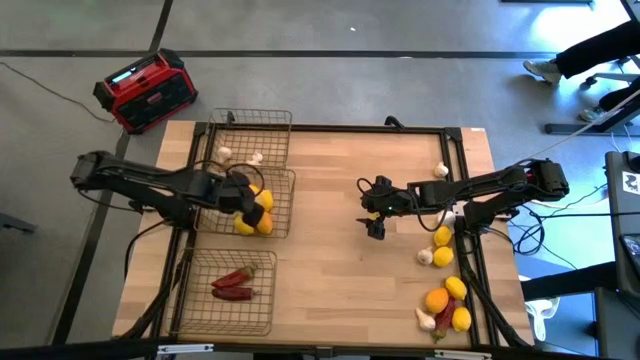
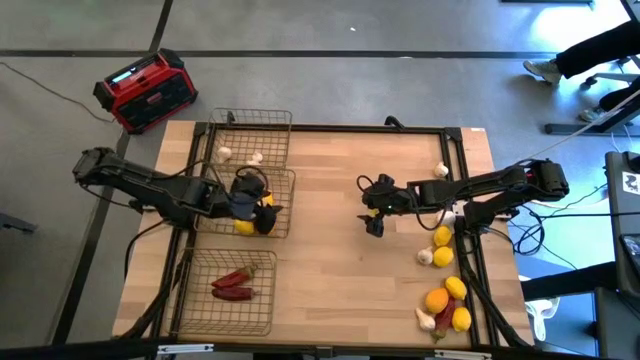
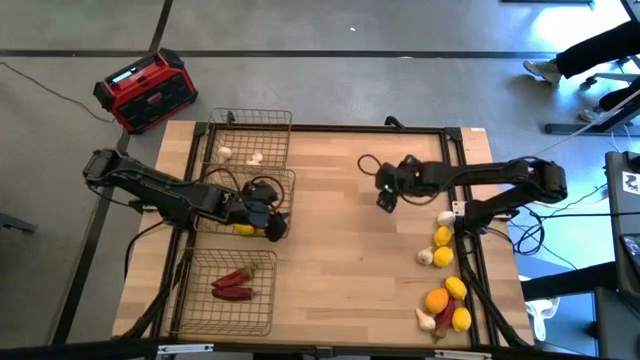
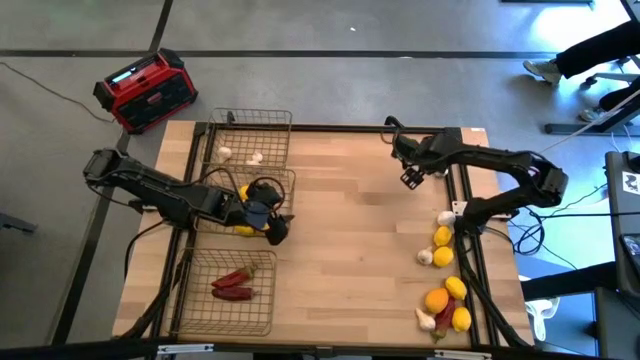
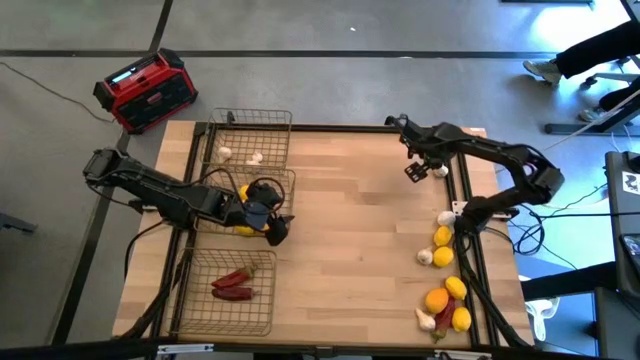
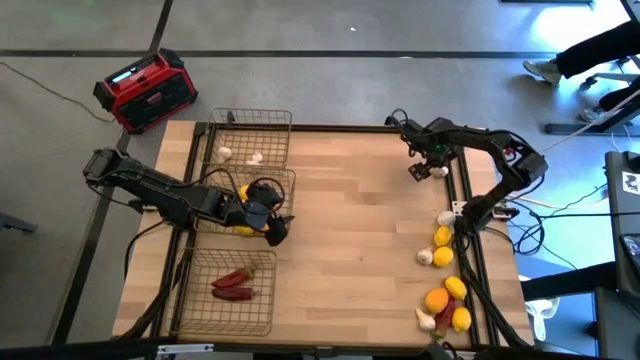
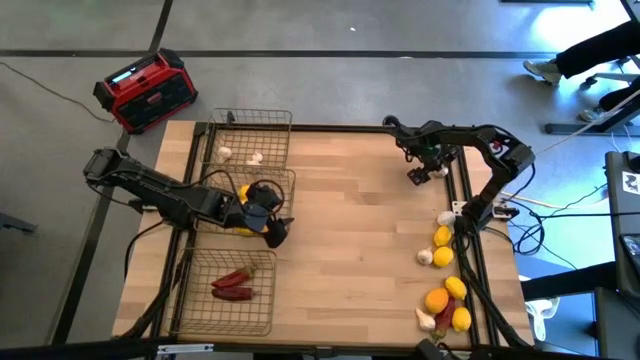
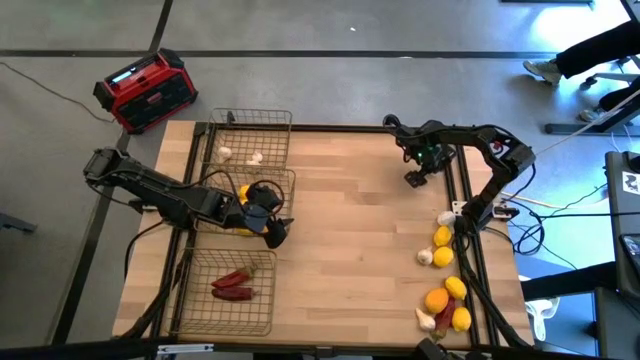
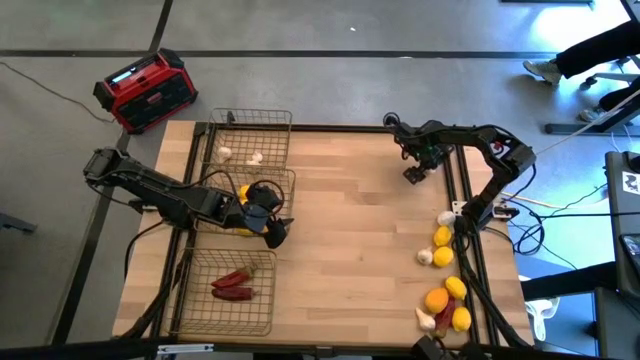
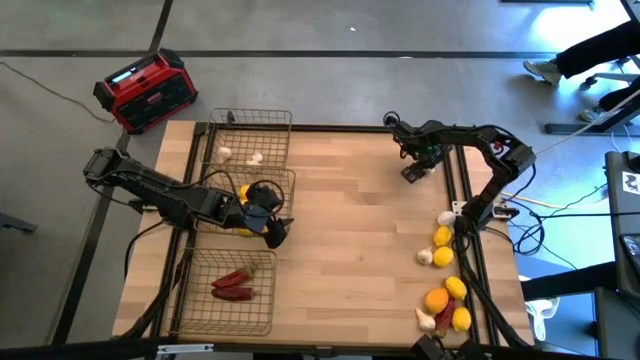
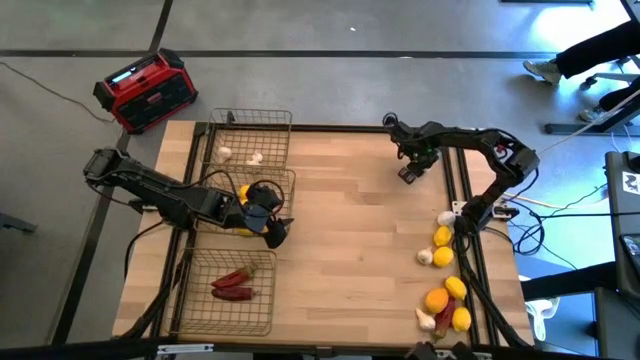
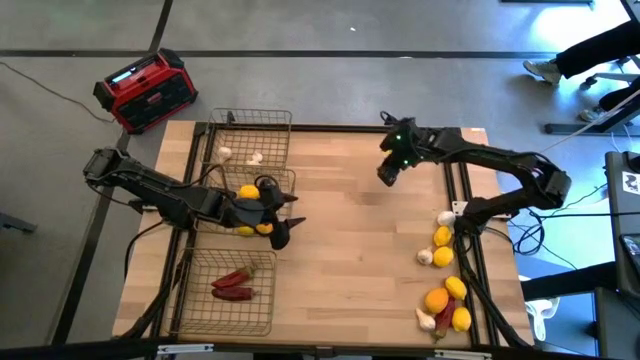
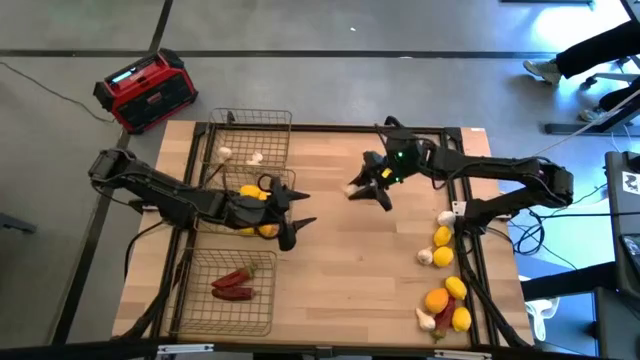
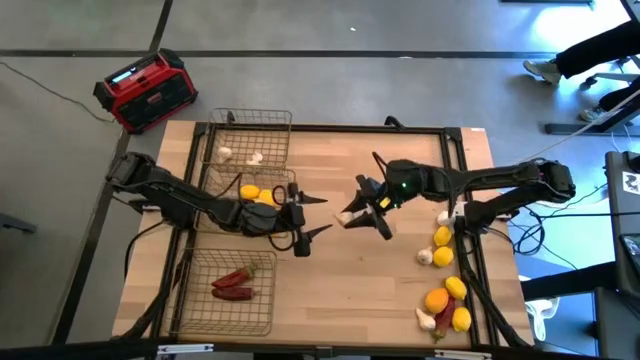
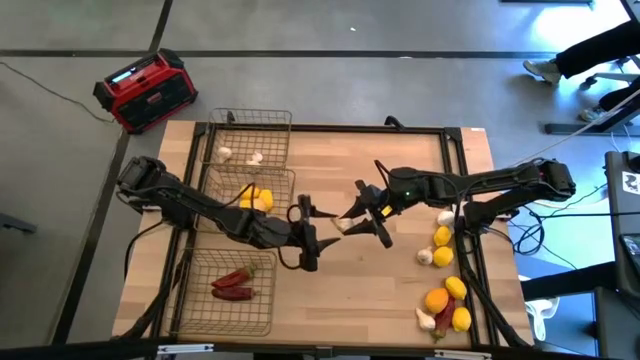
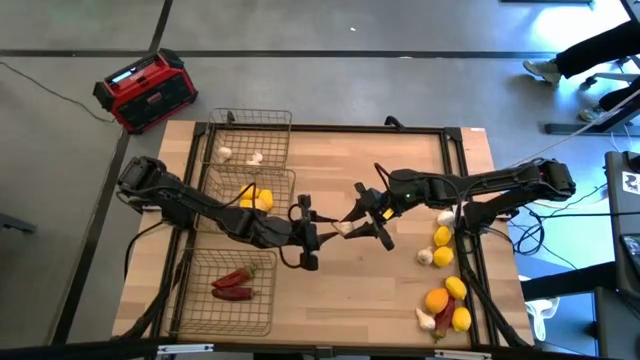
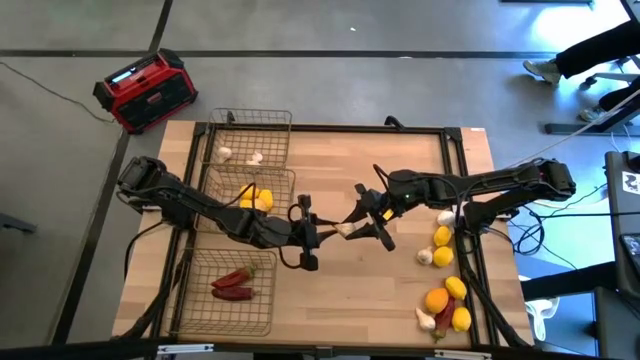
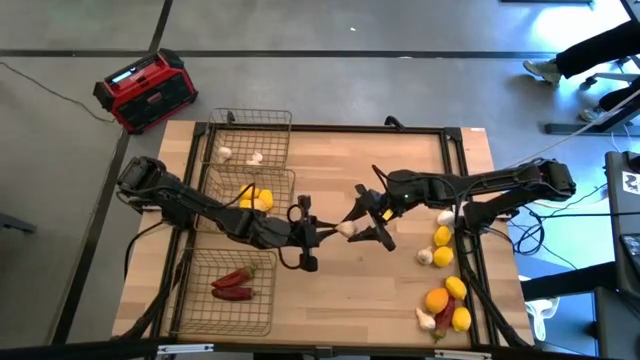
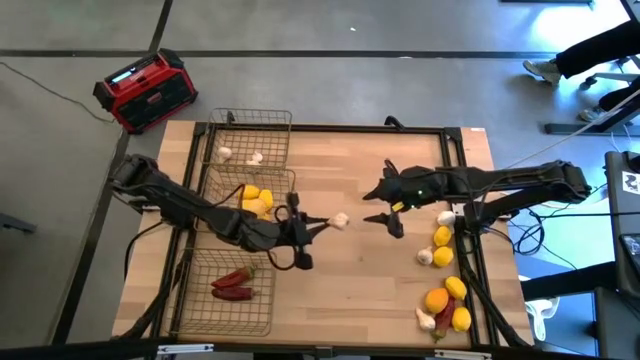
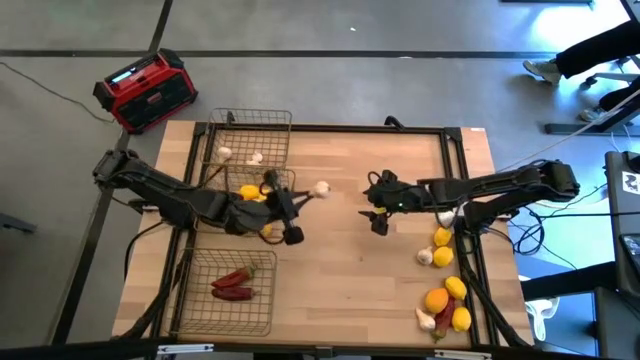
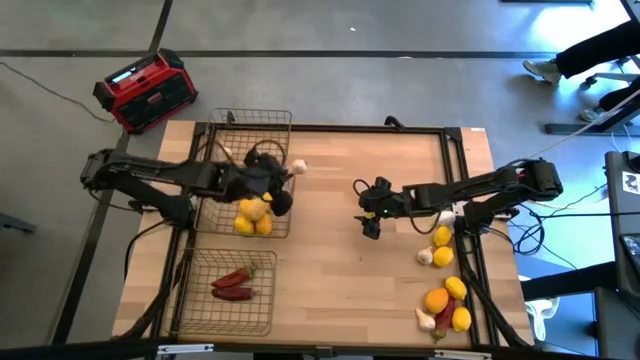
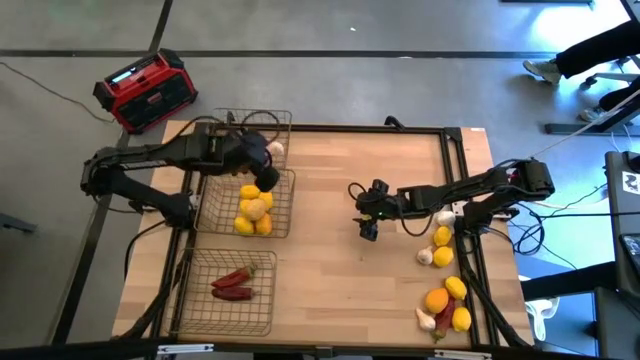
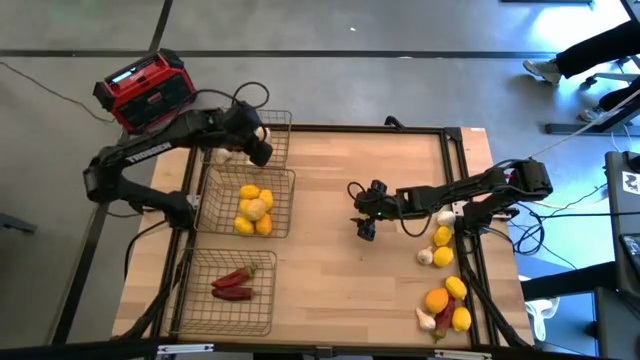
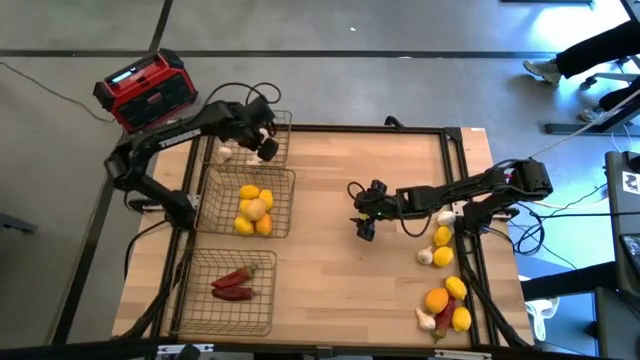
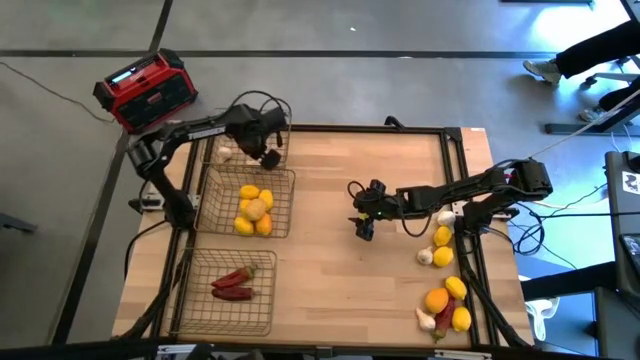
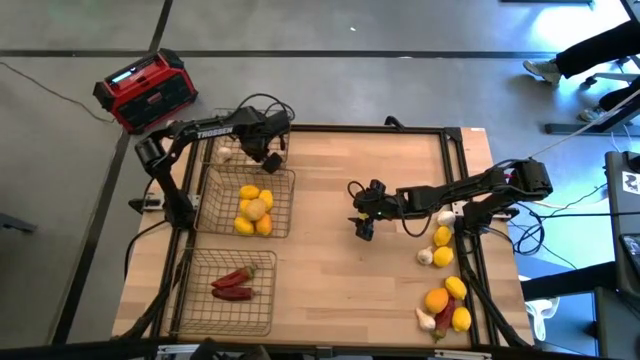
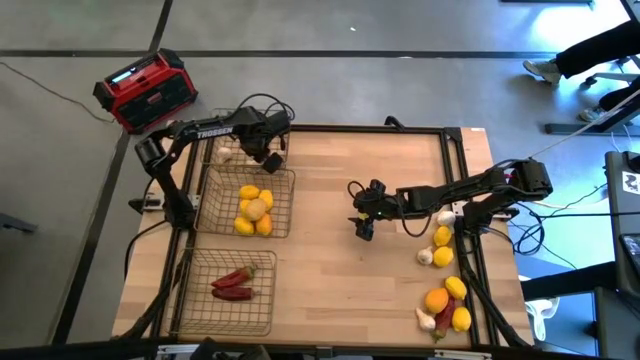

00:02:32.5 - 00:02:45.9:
Task: Sort produce into baskets
Put the garlic in the top wire basket

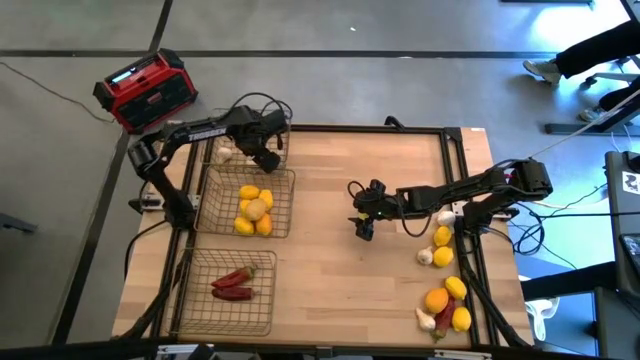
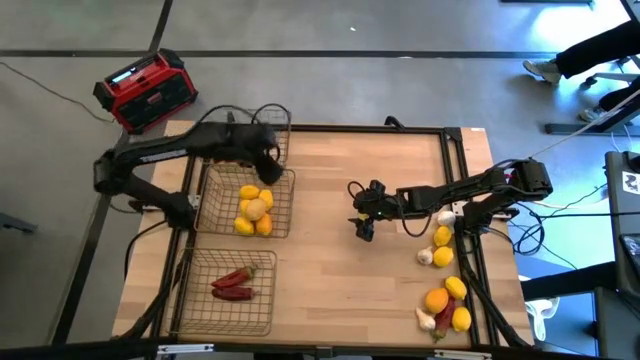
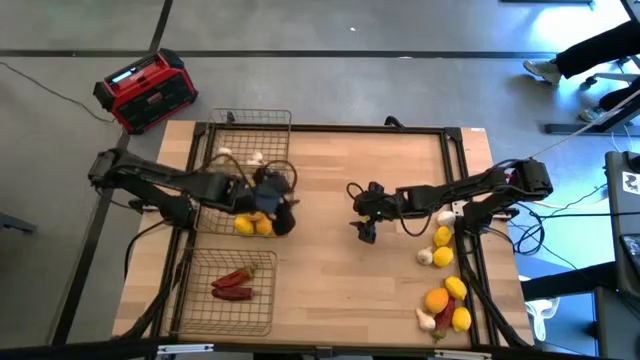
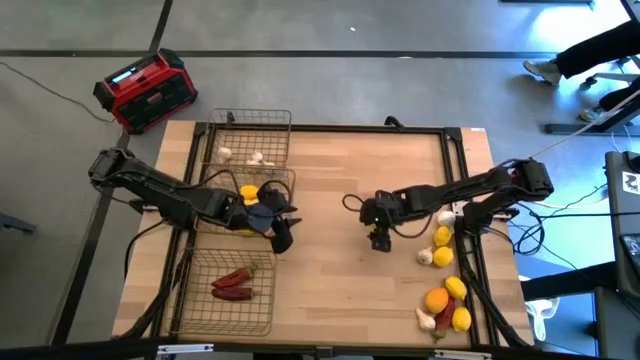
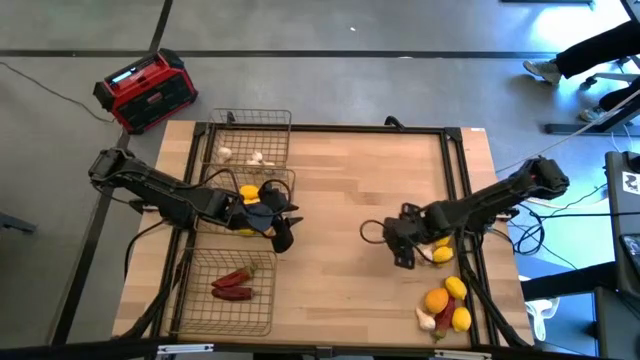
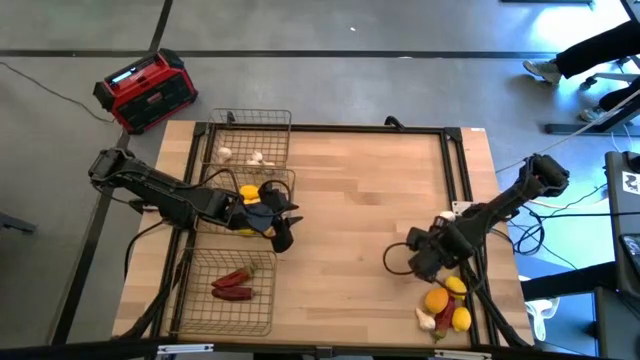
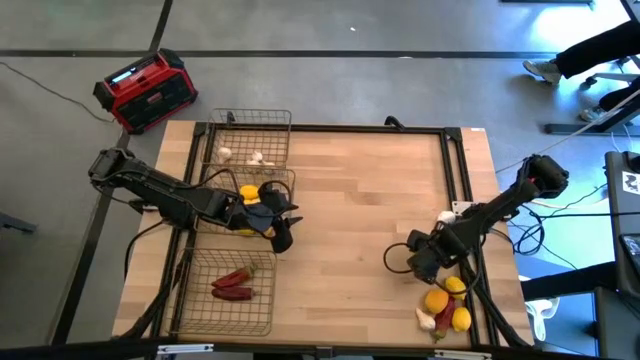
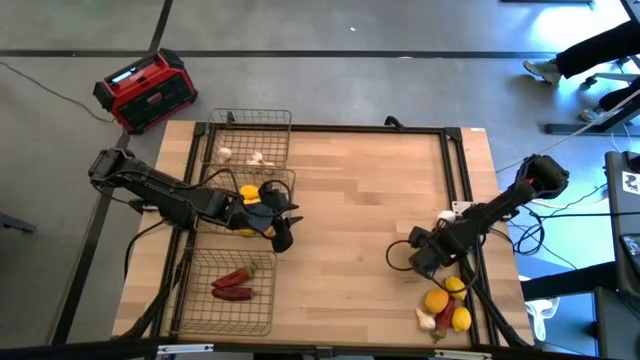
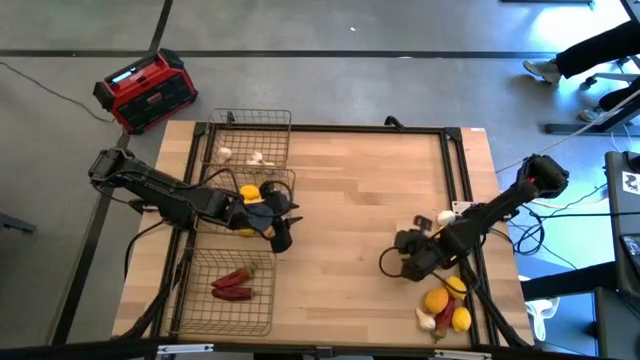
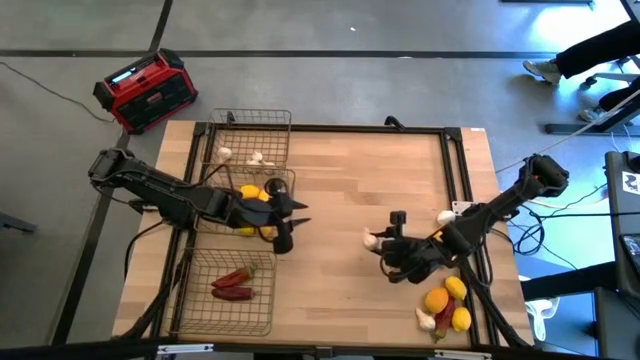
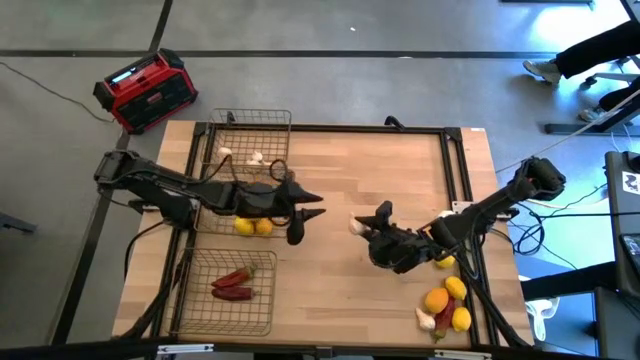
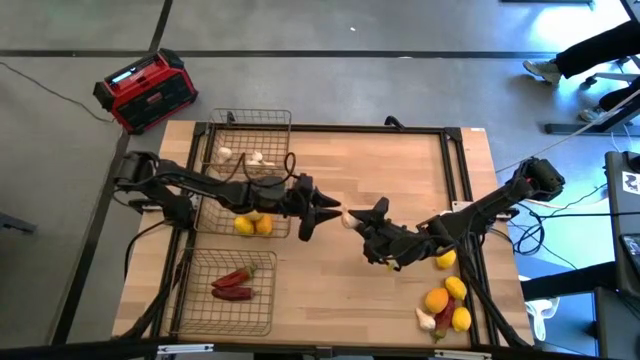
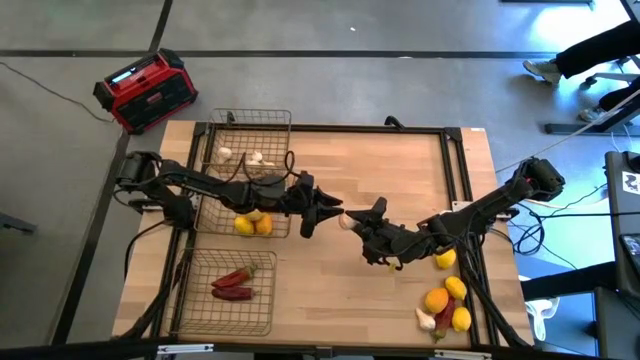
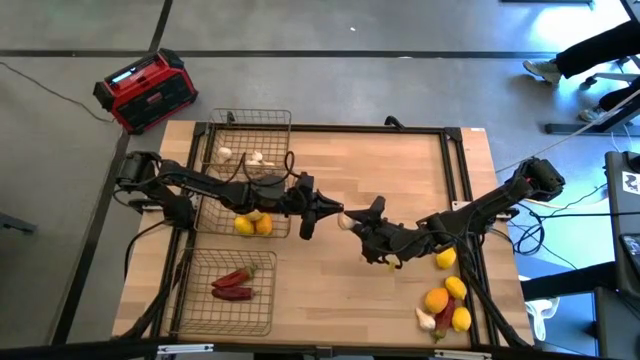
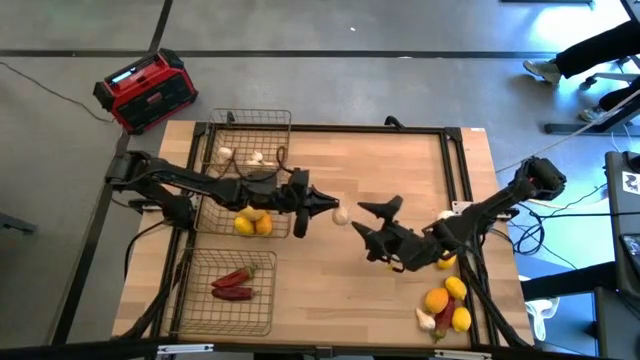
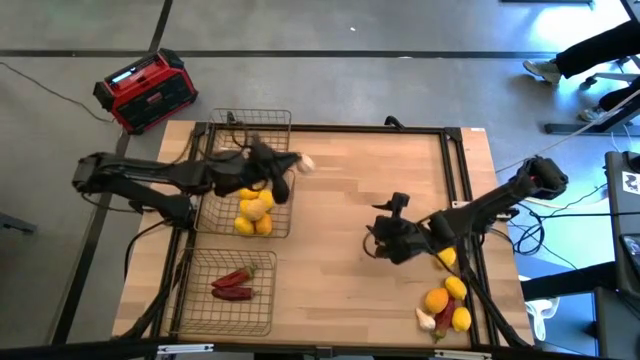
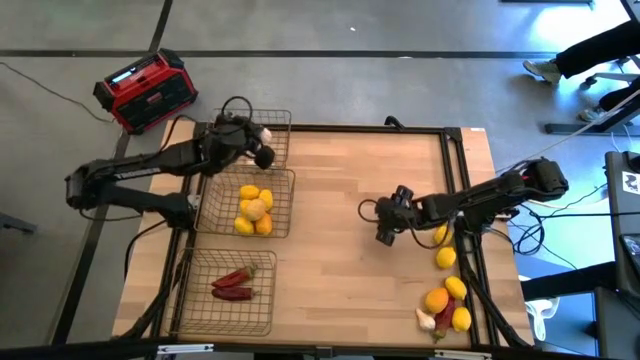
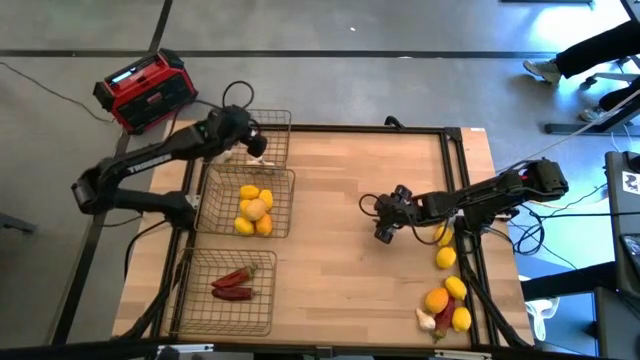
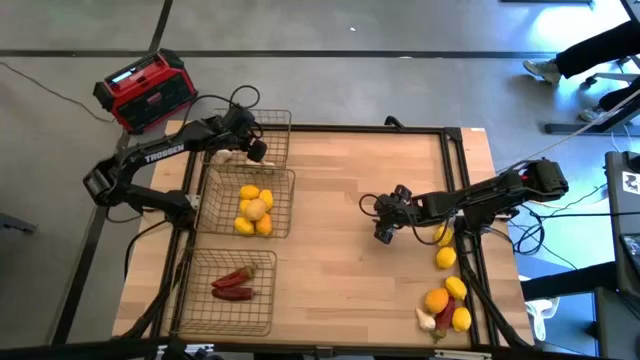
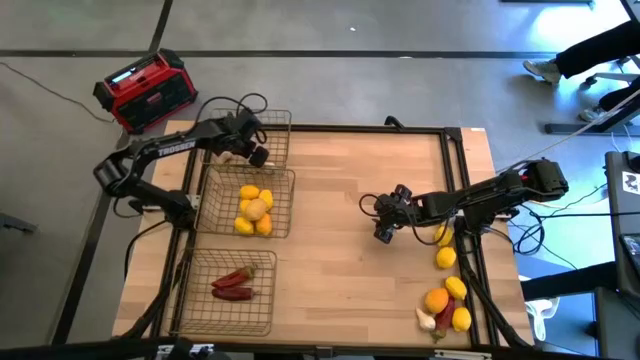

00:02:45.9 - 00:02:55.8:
Put the garlic in the top wire basket
